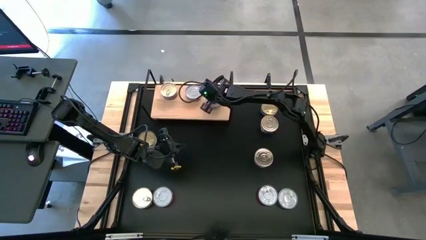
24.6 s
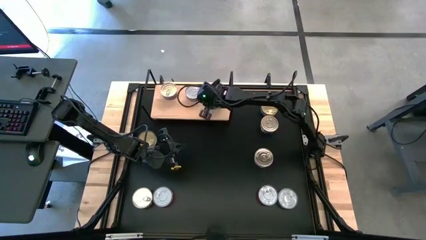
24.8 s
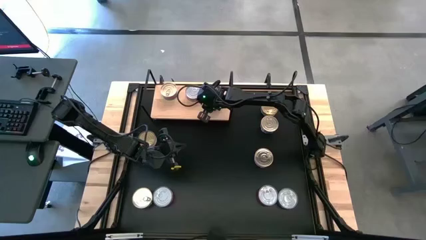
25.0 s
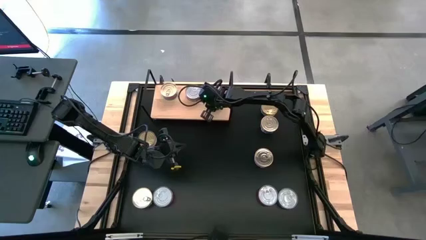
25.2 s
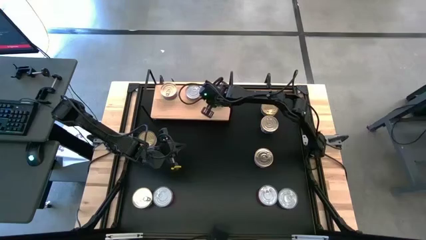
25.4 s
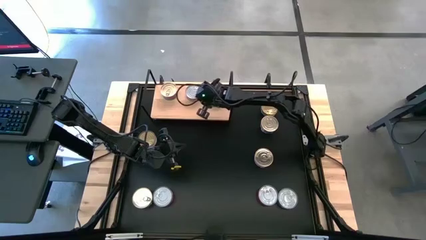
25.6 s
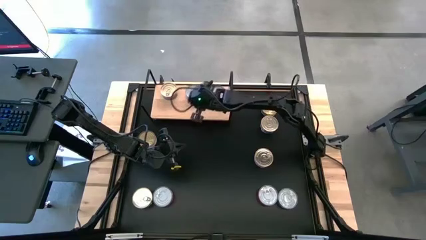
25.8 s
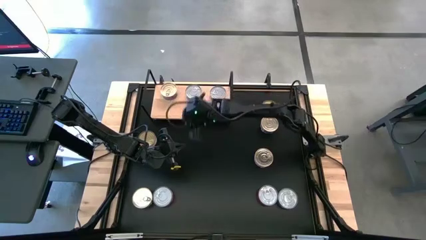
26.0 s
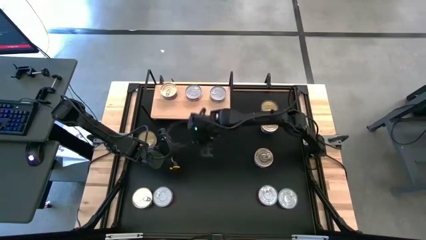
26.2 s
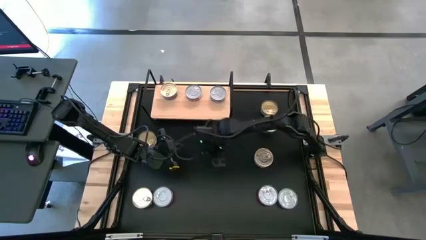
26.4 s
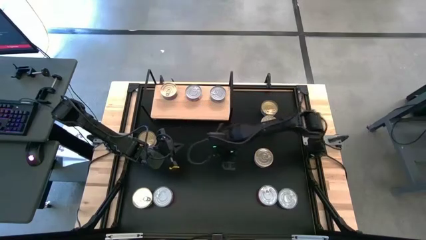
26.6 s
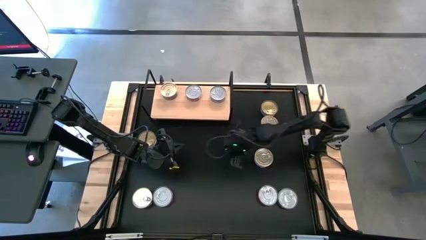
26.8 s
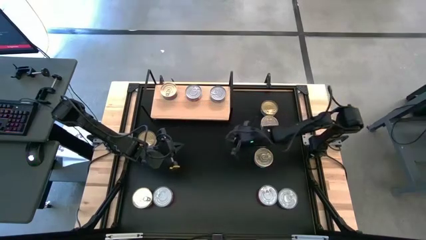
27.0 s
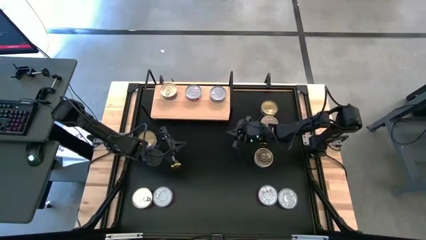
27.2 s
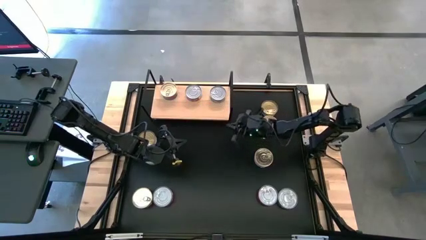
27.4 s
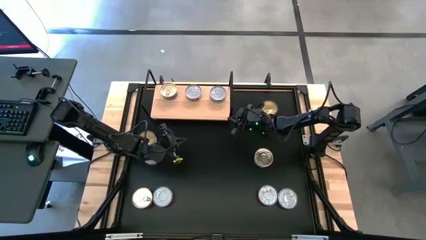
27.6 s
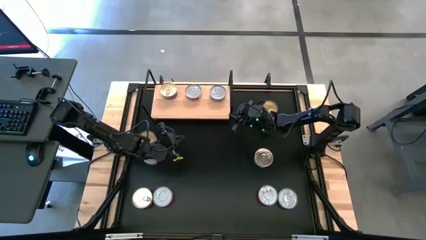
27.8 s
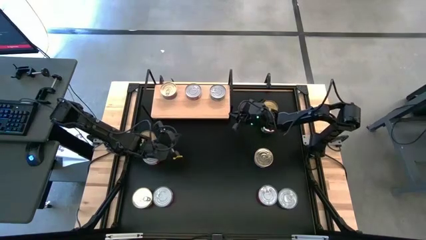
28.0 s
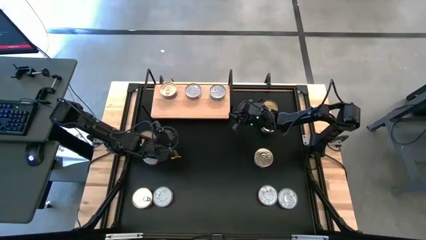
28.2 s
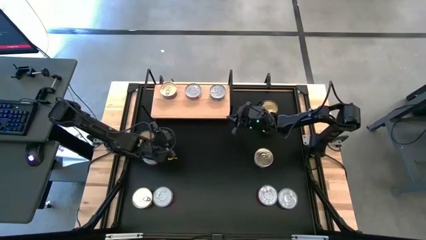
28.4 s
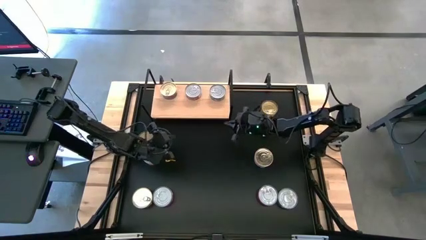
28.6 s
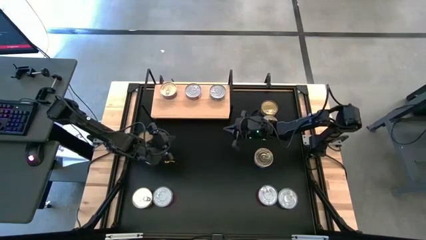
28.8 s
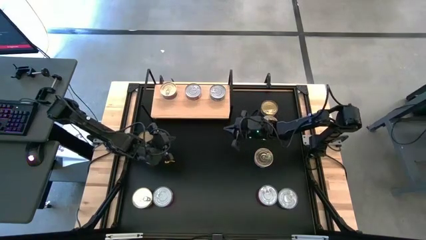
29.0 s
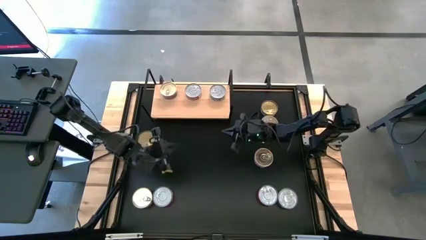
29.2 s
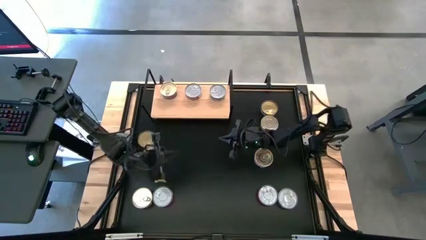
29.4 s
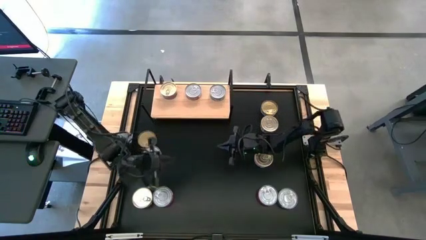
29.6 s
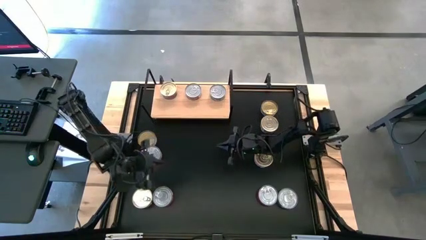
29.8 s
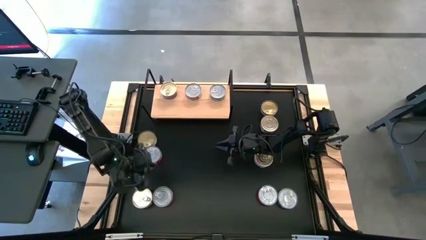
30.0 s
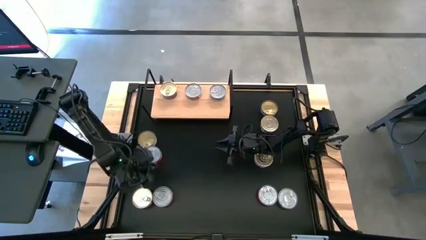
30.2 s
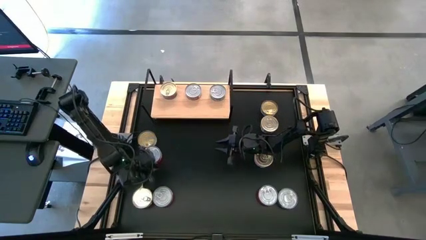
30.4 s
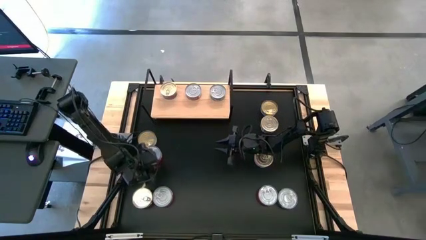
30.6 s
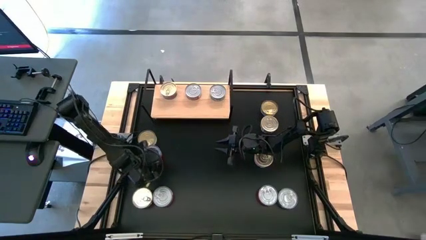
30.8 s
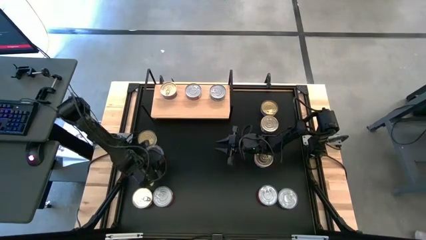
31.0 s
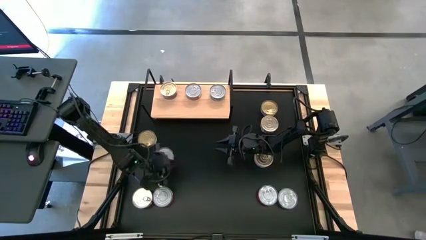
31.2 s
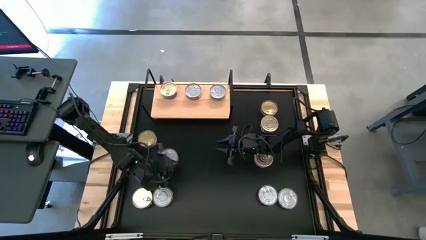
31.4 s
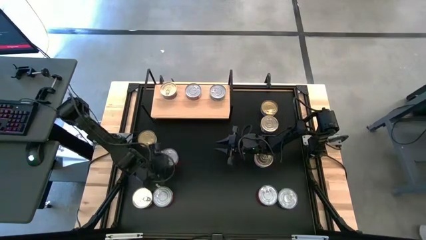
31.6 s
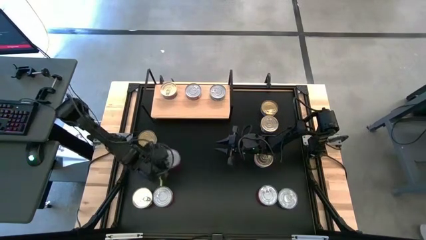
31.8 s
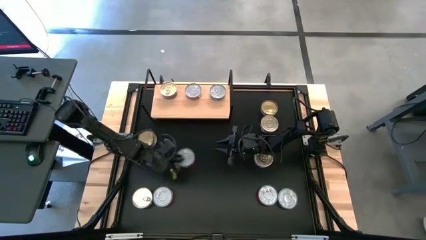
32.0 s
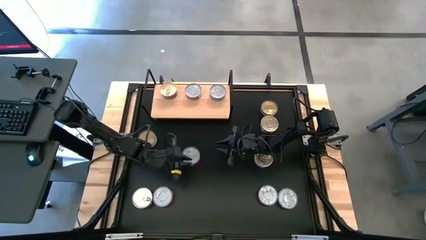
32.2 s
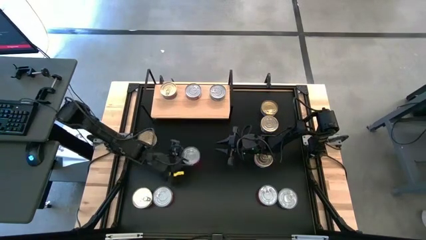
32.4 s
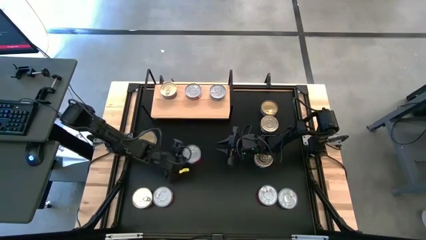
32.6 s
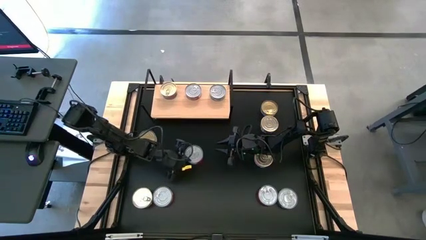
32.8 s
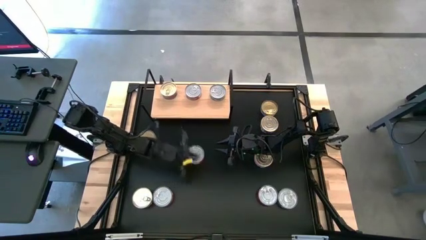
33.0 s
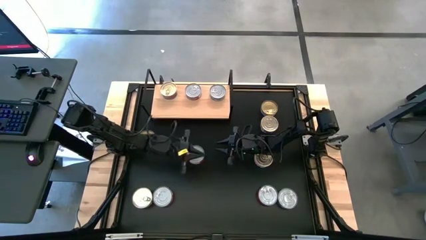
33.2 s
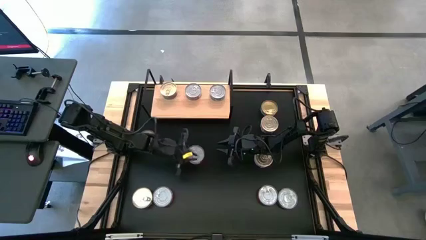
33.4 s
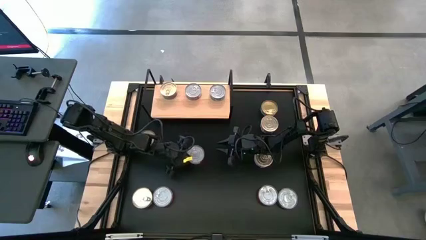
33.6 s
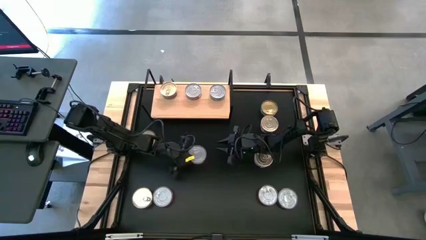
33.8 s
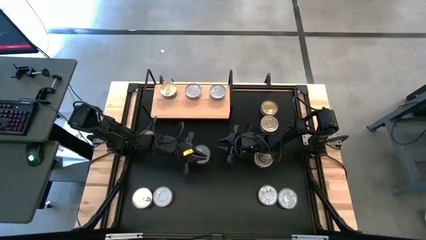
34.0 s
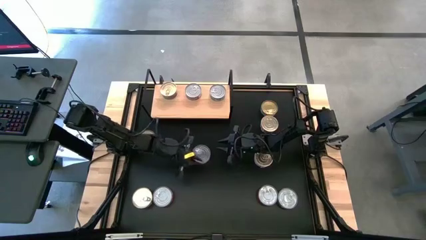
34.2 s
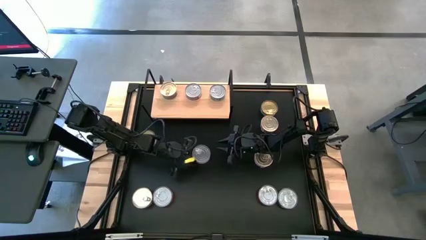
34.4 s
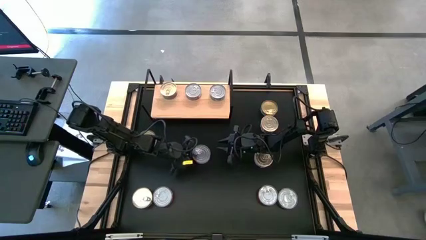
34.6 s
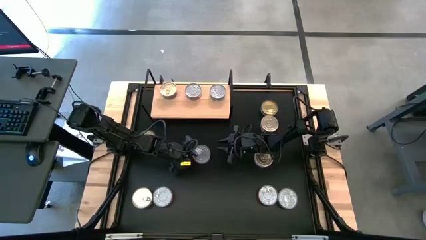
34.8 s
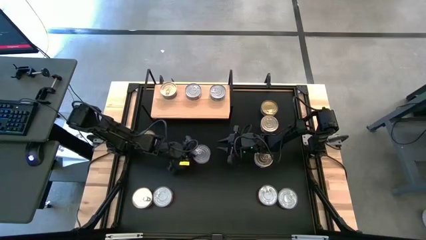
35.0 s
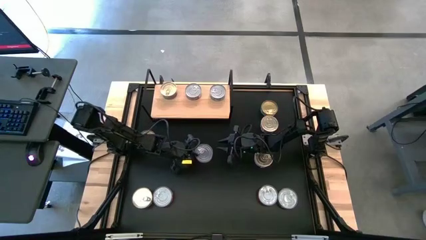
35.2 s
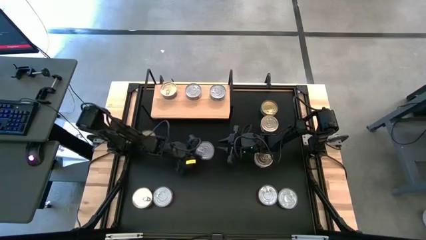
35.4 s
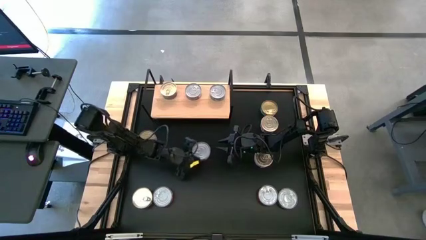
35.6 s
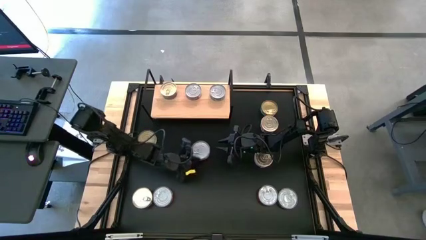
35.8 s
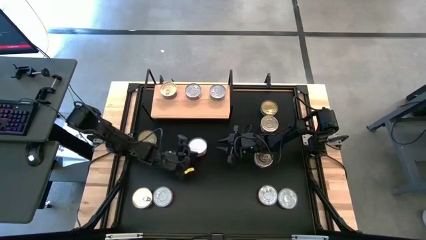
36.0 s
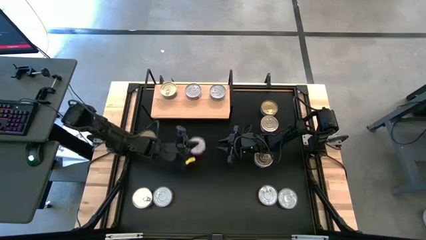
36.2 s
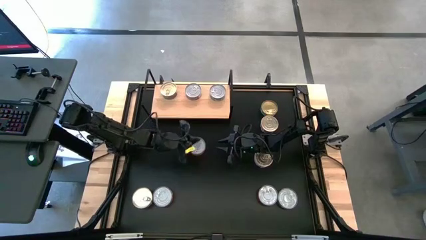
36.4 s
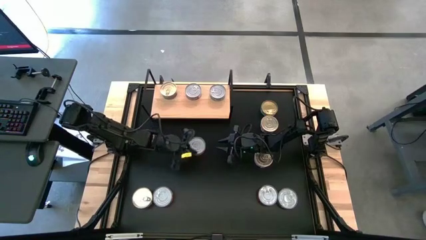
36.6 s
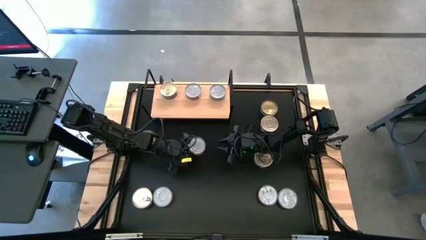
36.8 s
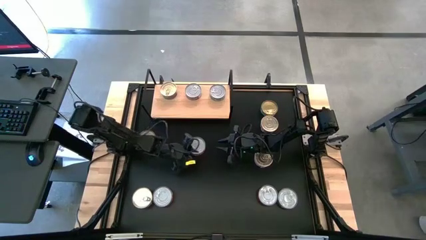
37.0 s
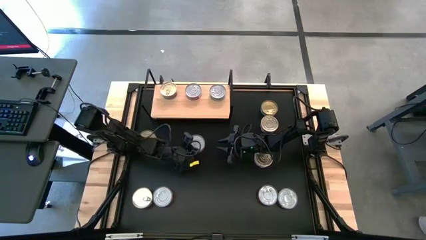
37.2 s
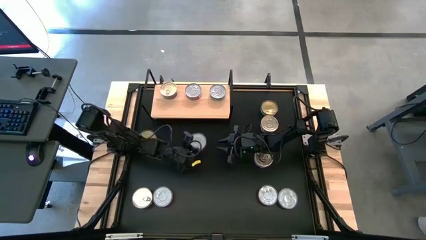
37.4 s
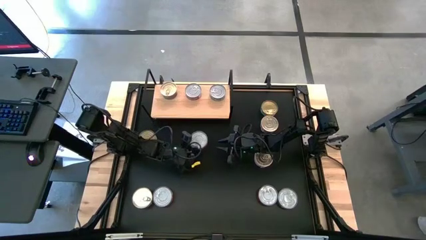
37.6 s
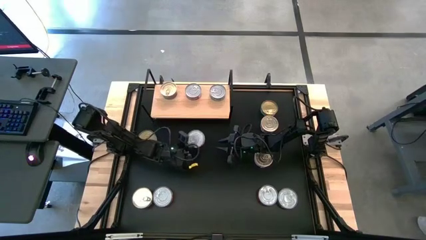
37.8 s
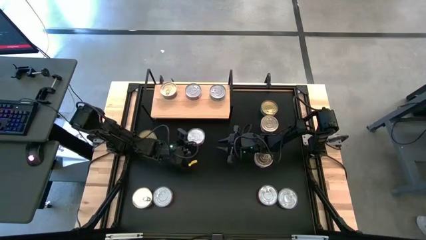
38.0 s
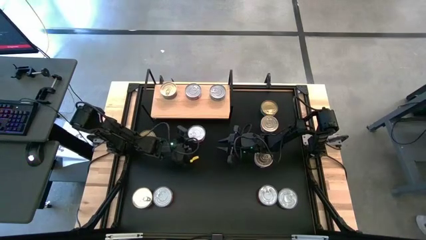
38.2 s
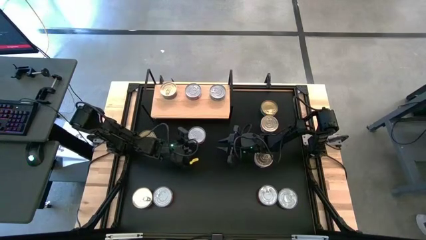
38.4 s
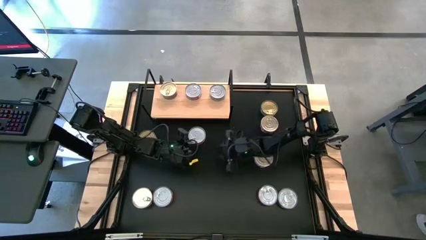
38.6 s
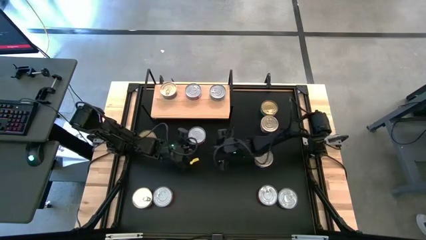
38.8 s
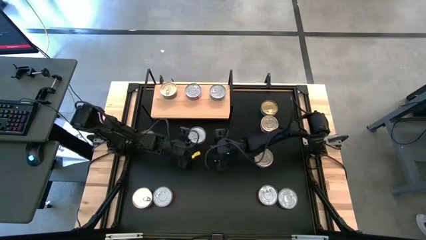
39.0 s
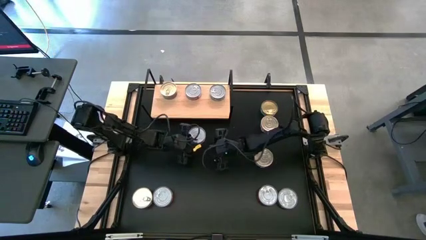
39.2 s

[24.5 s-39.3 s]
Task: Stack canned seafood by type on shelf
Put the middle right red tuna can on the shelf and align it with the other red tuna can
